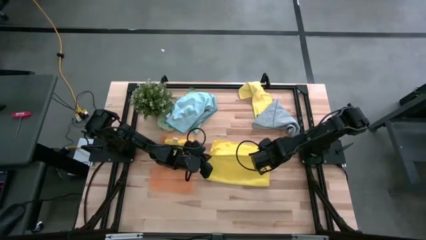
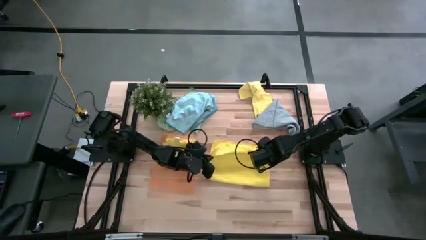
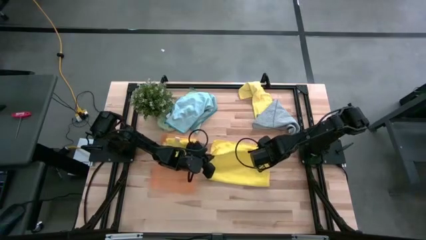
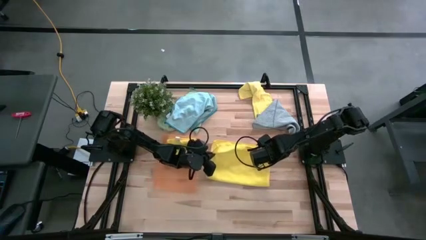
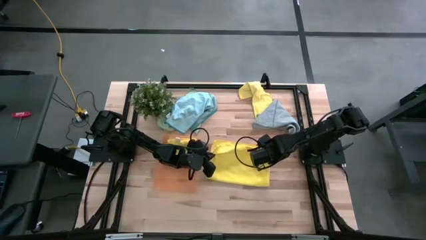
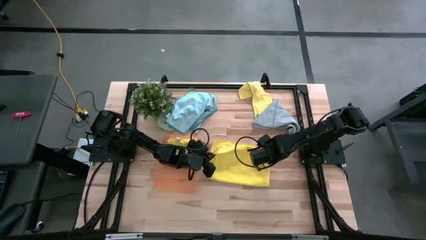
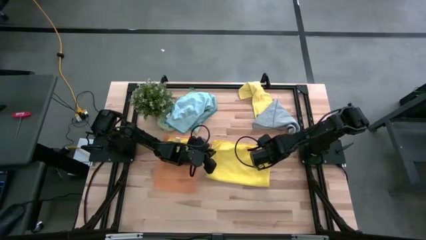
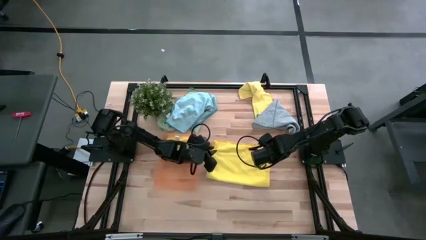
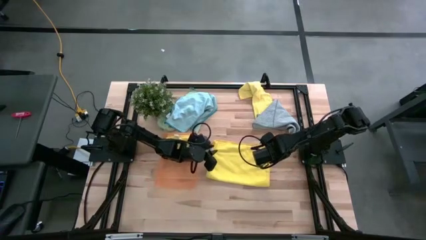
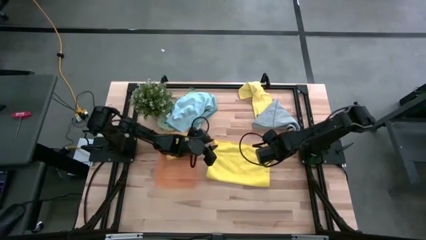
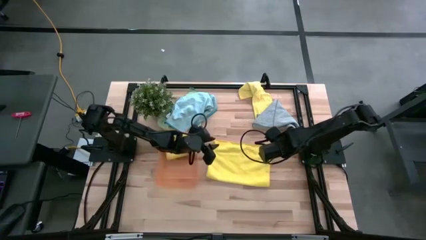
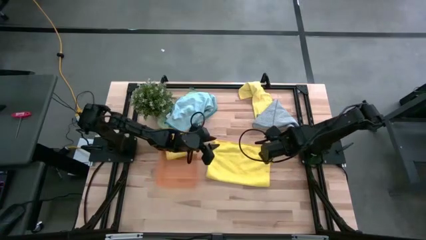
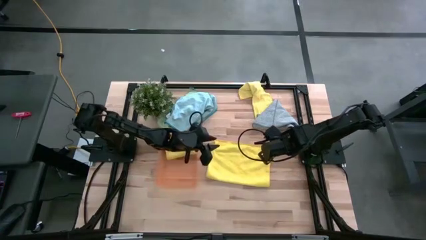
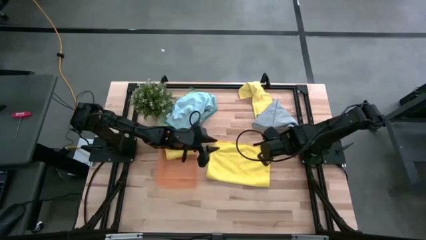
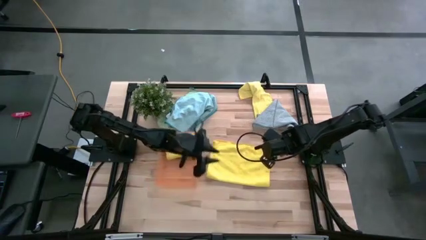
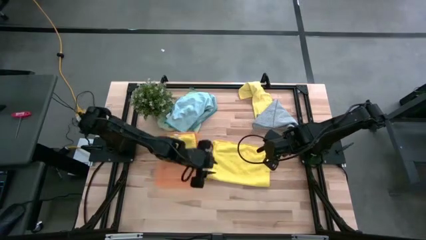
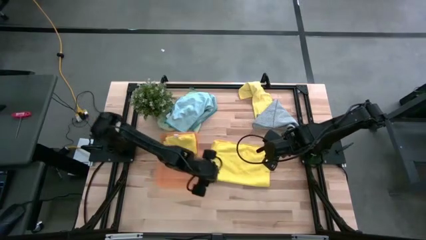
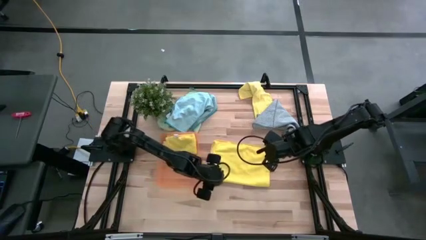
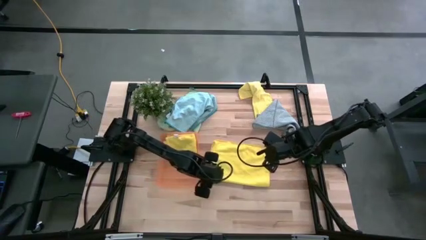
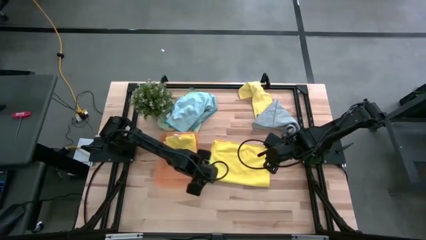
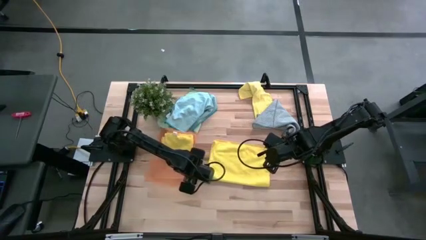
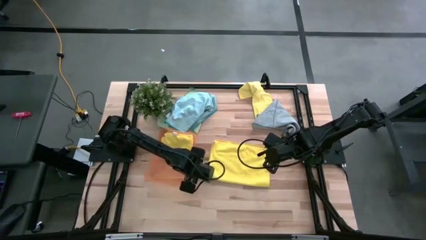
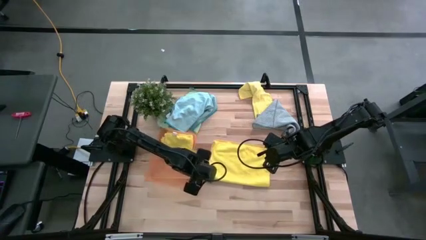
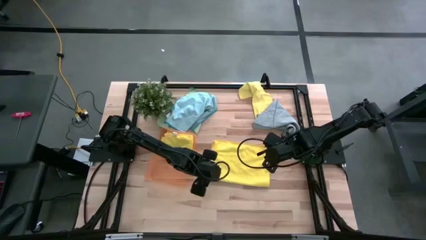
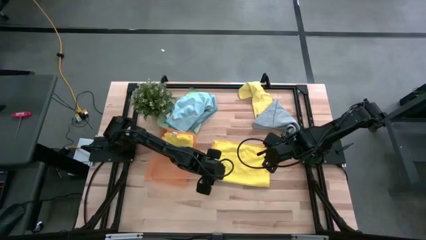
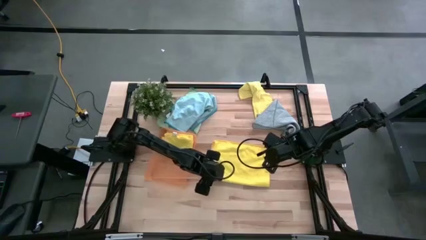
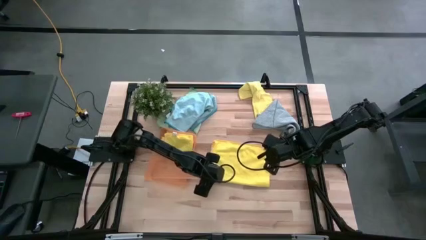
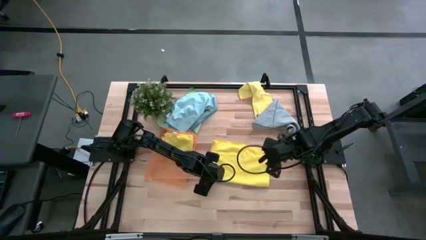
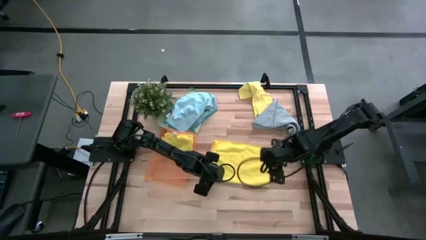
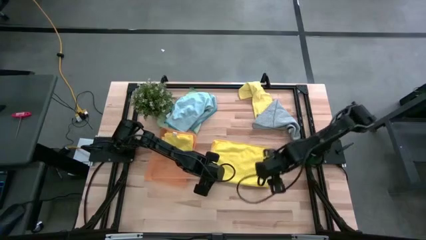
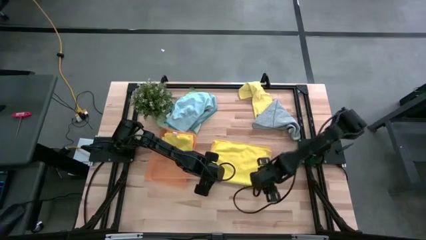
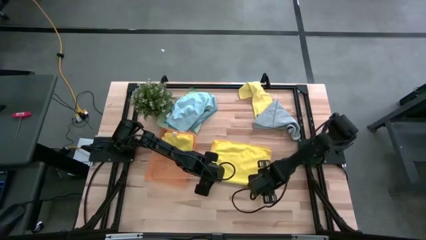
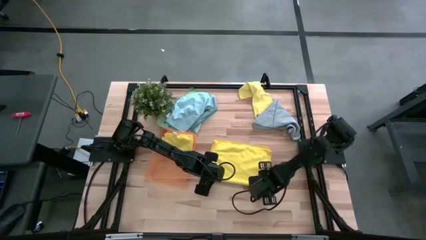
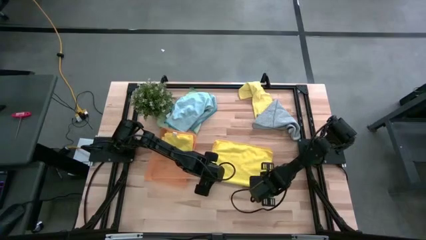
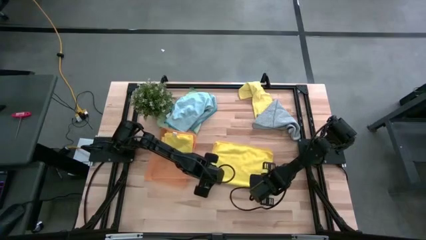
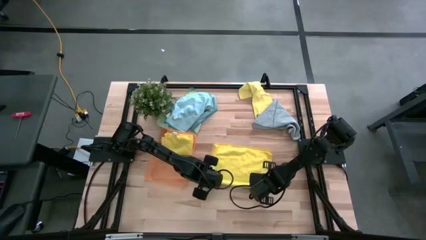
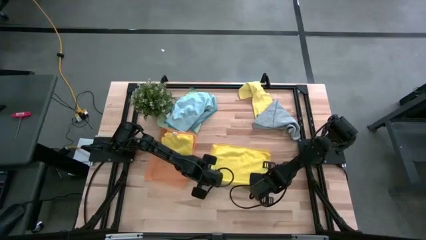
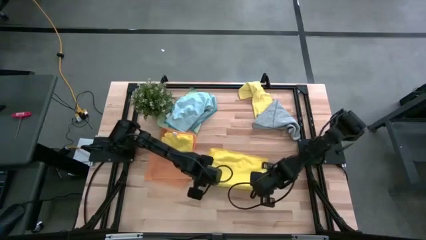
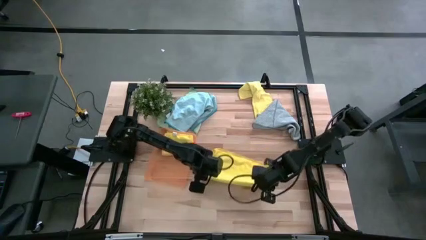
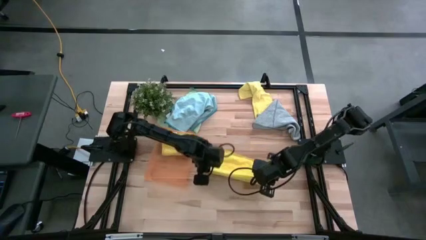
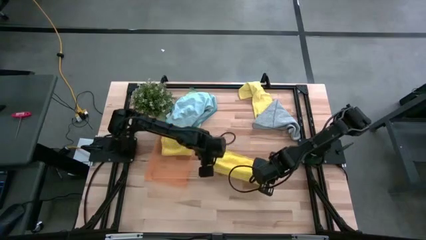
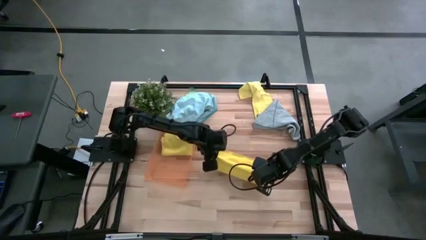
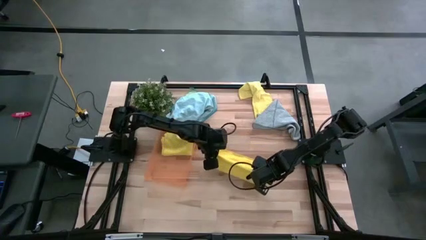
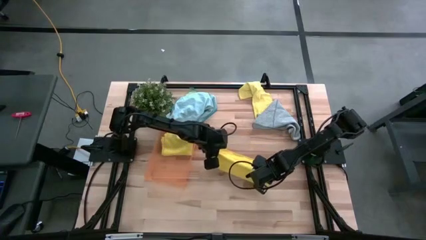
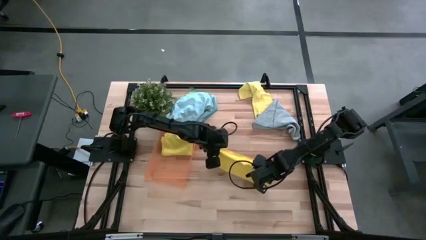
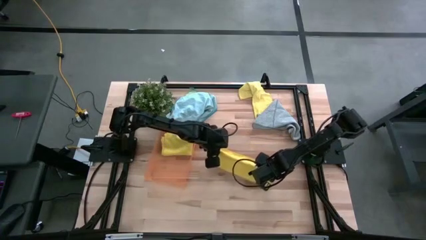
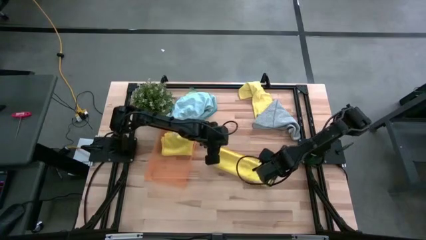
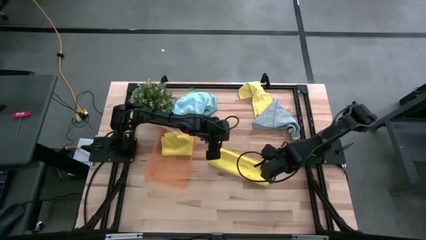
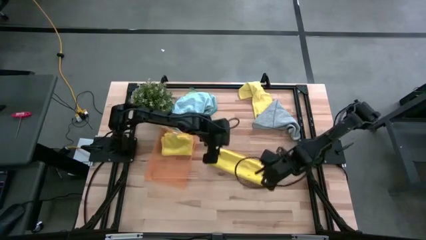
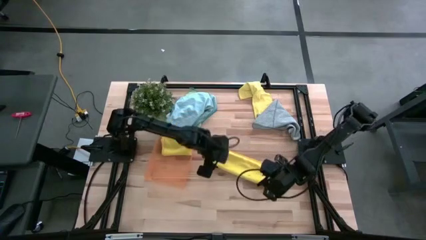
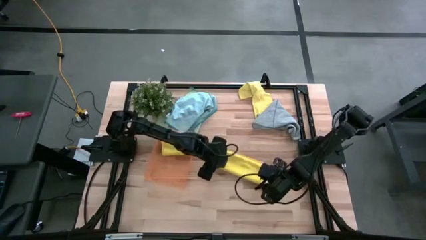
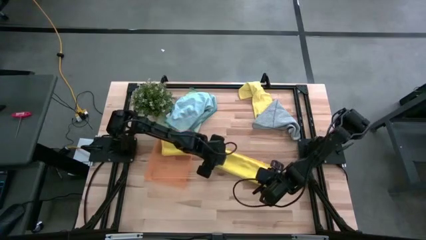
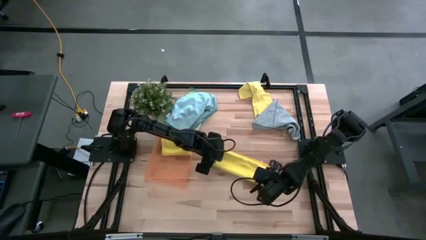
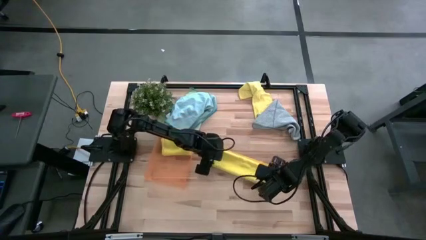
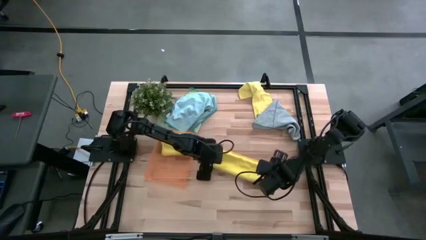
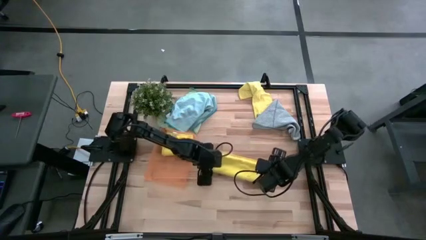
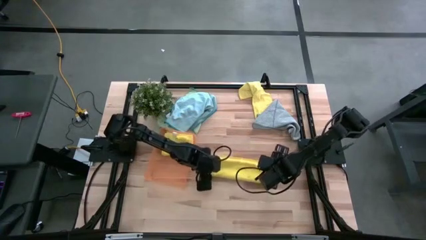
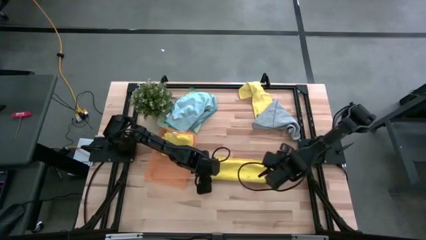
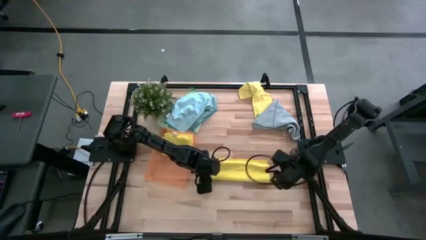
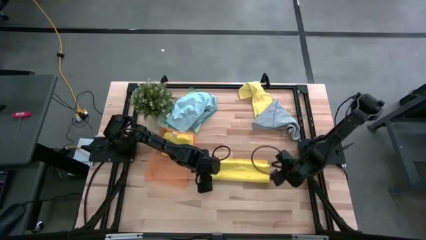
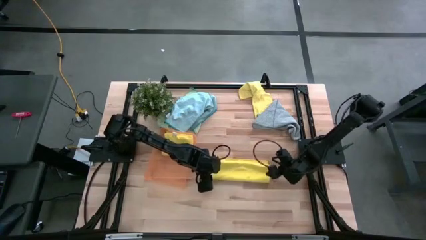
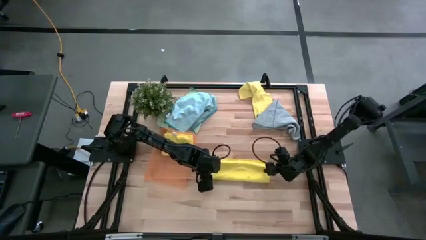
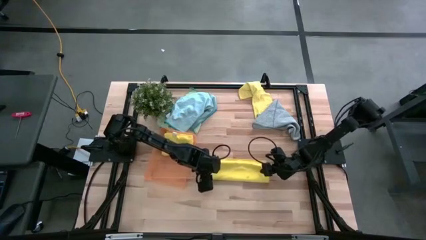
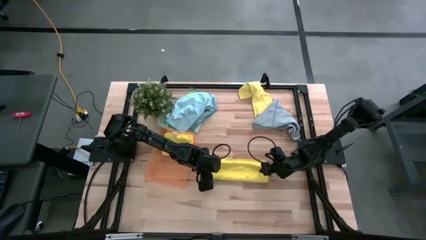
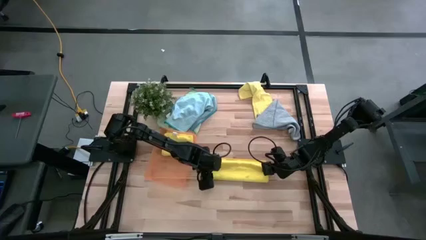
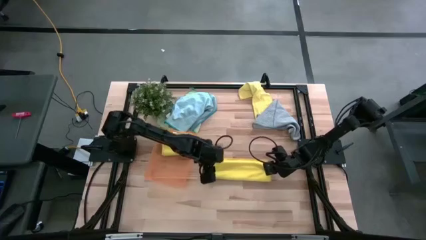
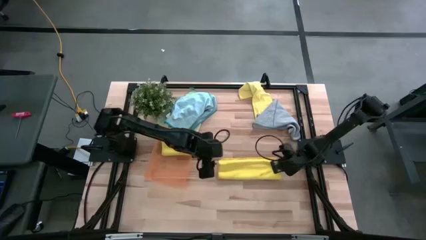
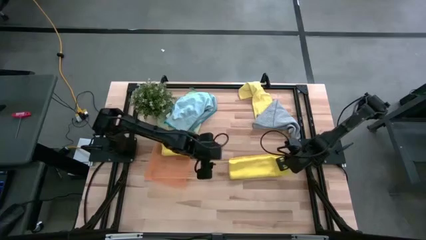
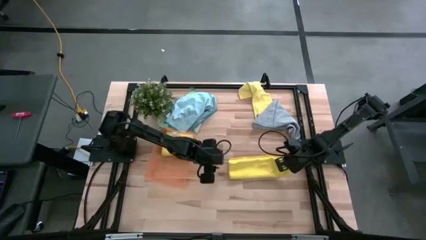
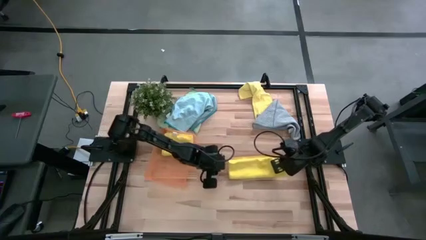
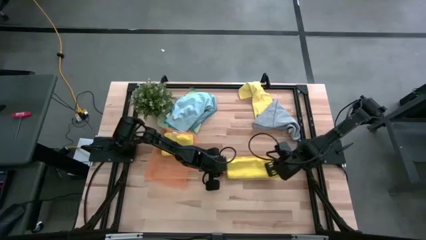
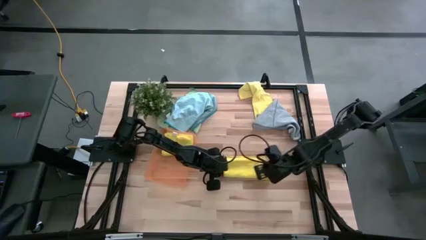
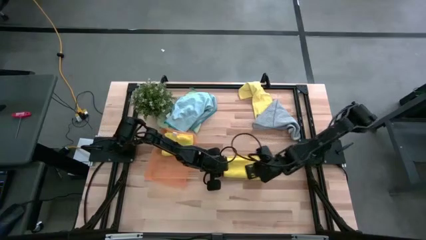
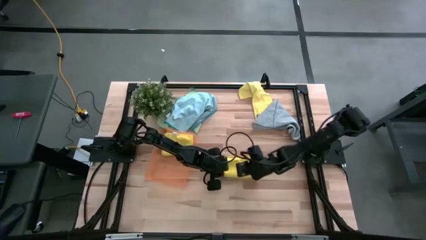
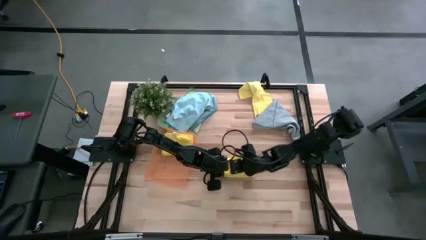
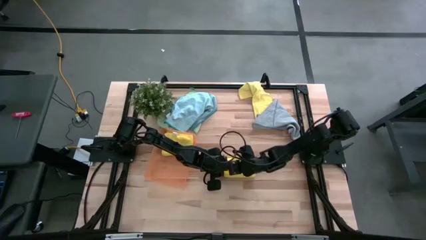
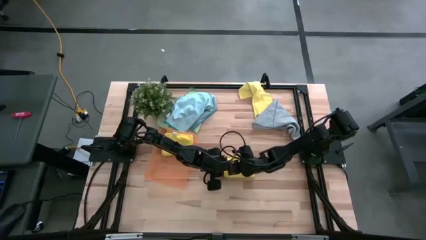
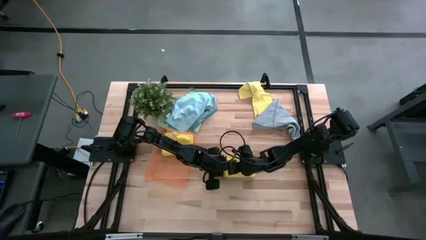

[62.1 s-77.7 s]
Task: Fold microfiber towels
Fold the middle right yellow microfiber towel
